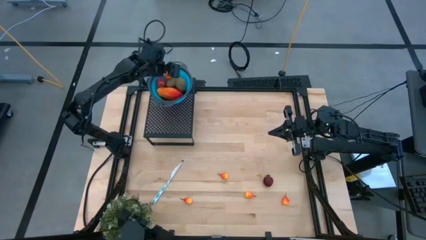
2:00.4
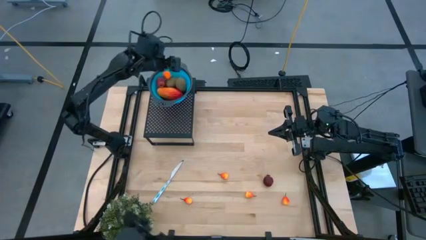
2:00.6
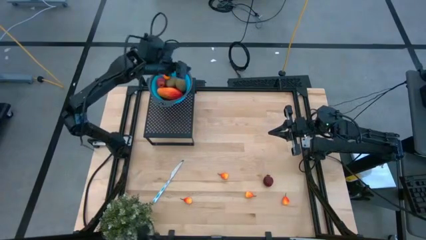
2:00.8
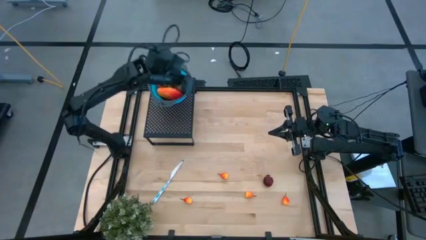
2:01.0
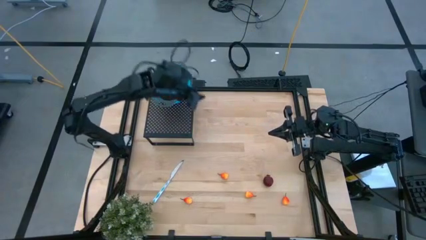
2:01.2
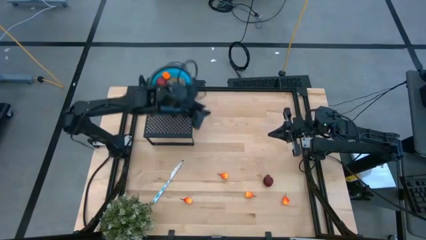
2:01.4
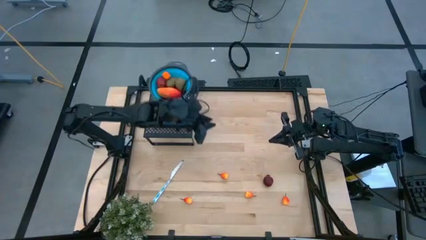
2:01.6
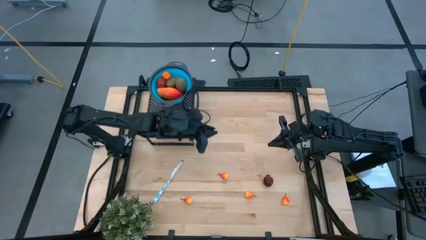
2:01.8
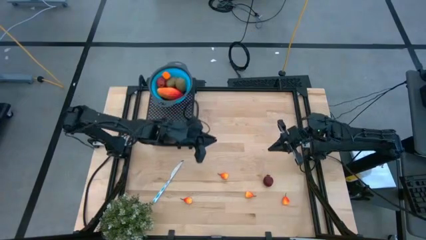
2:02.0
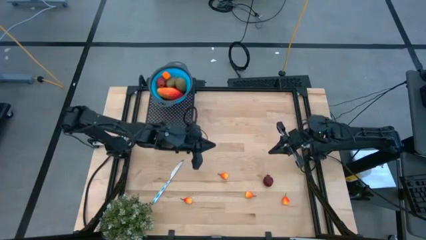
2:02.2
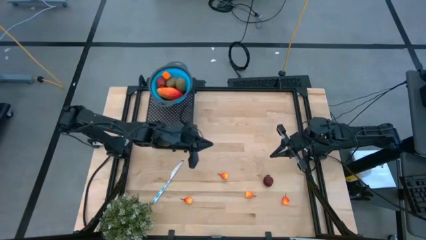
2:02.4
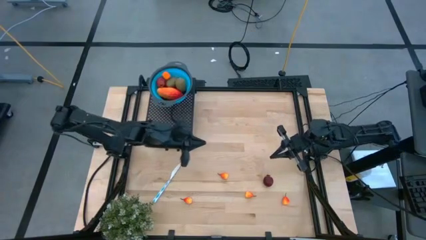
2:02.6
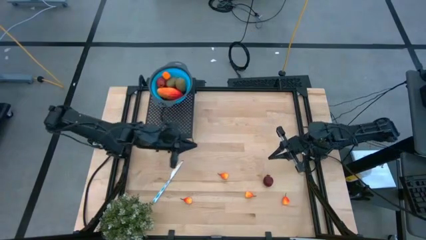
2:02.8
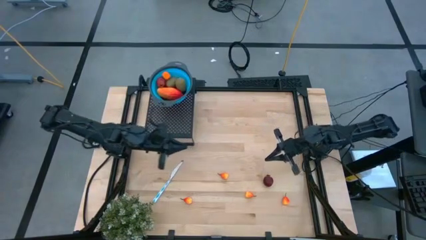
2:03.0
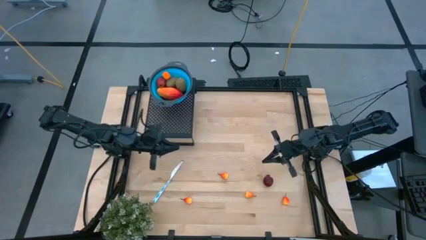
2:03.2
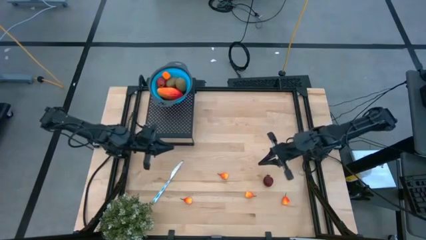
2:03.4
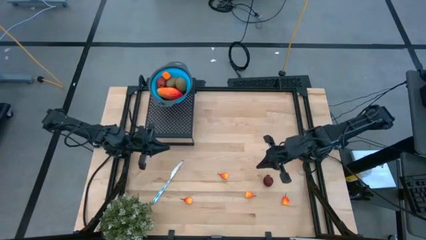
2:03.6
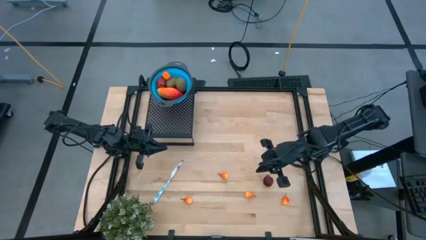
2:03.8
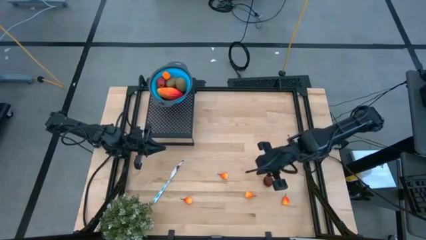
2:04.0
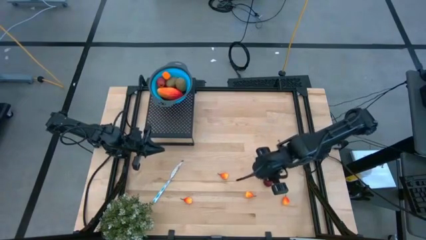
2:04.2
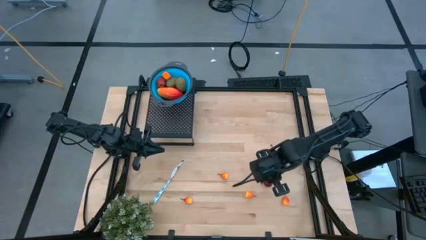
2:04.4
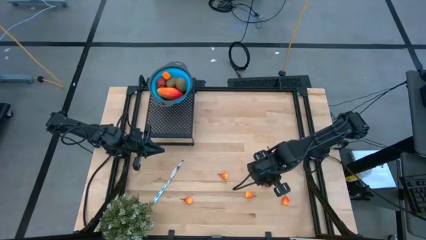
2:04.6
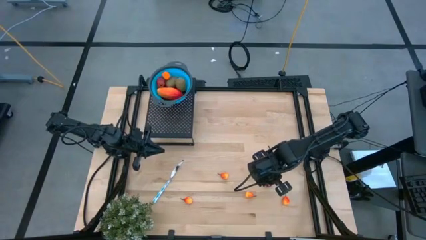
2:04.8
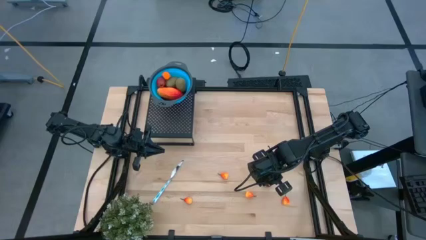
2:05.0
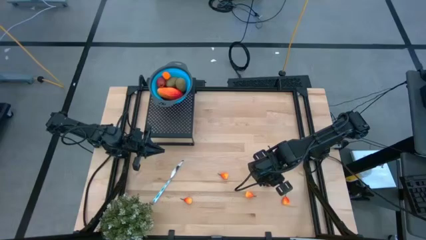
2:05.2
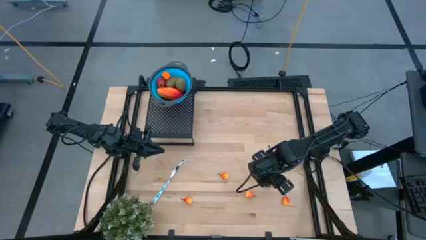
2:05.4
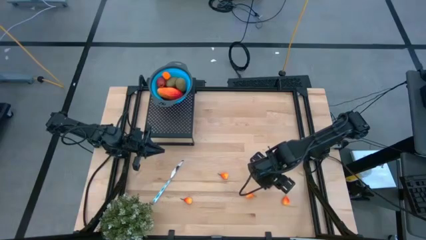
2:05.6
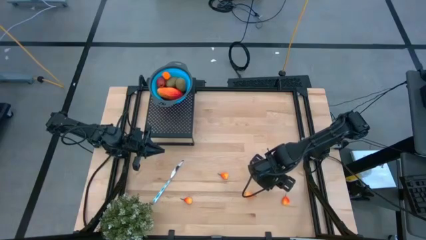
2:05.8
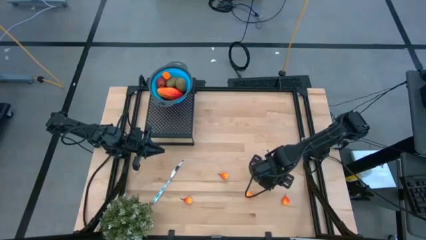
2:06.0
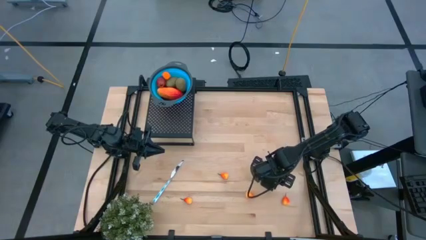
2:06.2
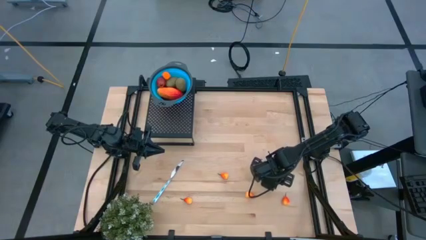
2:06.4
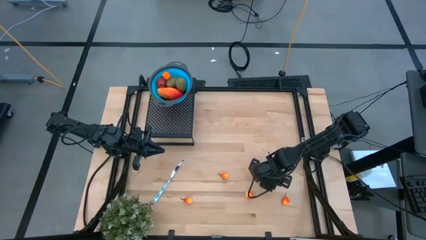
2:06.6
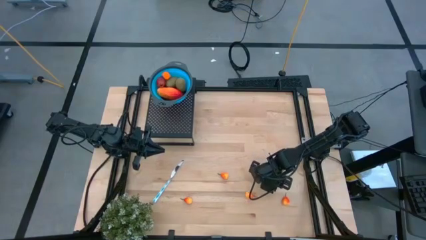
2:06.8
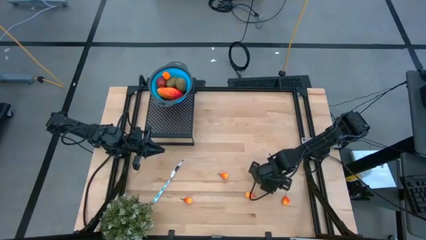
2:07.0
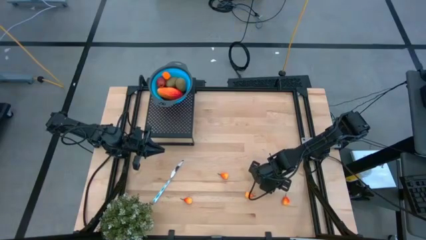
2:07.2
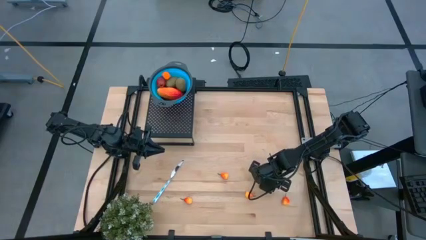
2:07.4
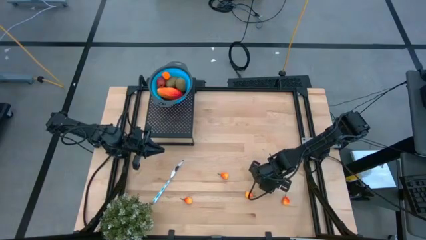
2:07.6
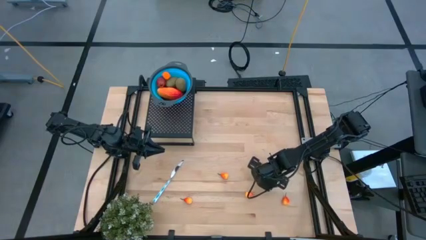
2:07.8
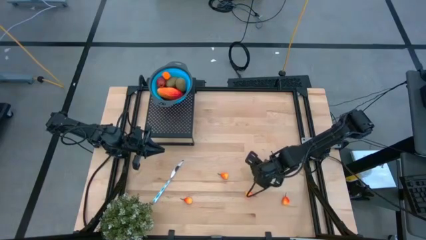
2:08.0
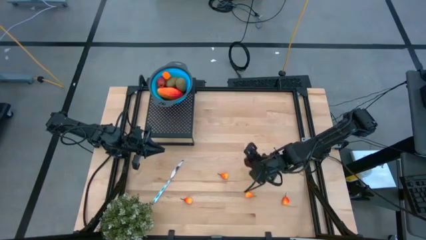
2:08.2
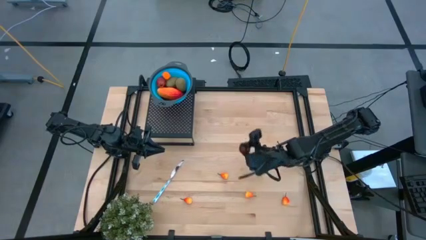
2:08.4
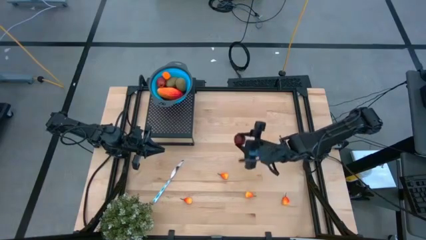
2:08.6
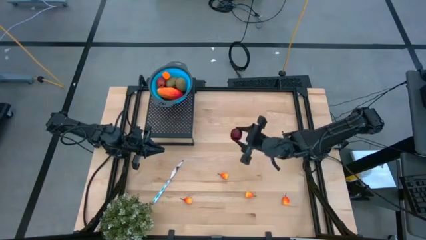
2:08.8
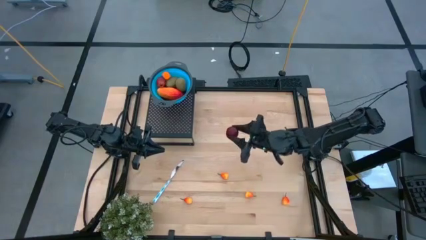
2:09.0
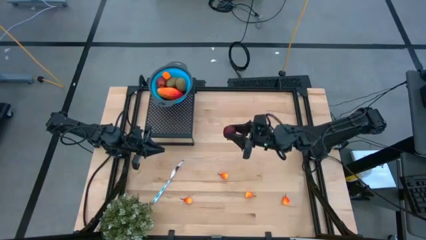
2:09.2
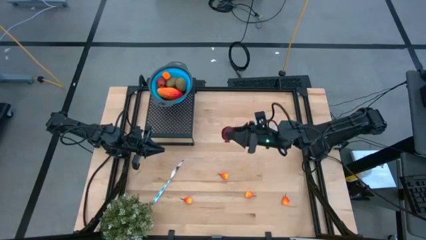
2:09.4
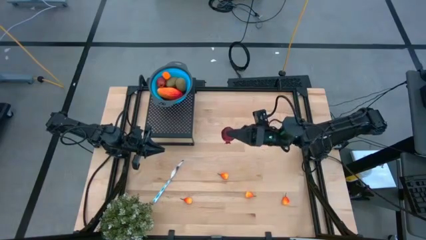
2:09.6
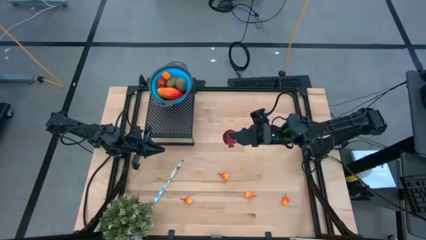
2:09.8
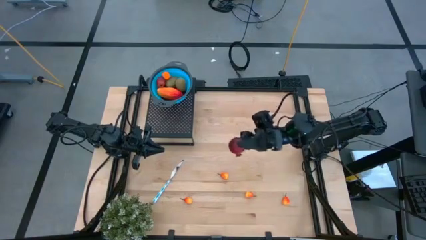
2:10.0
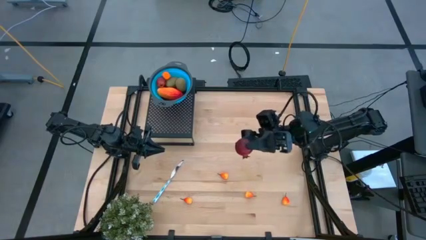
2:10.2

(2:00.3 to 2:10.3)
Task: Pick & Place Fruit
Put the red pomegranate into the blue strainer bowl on the shelf

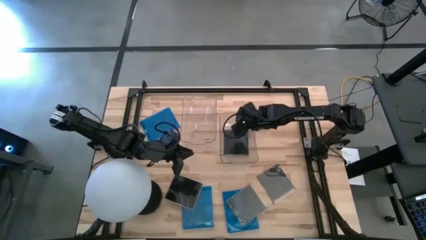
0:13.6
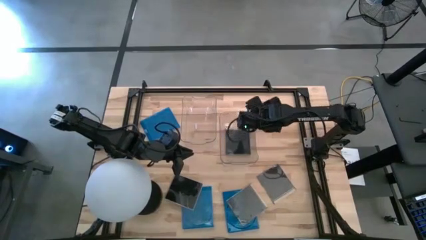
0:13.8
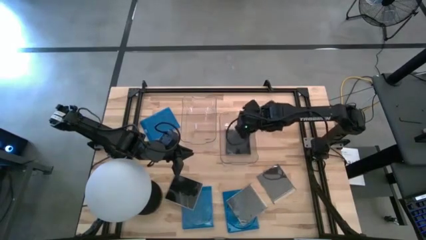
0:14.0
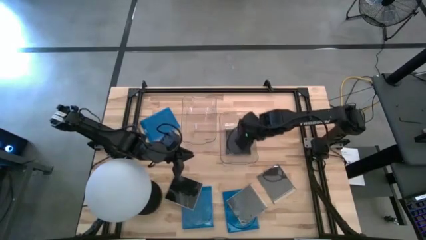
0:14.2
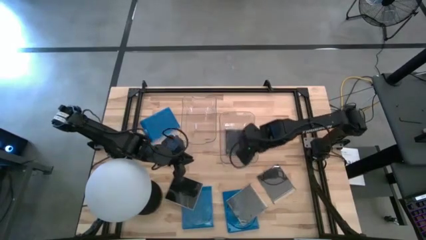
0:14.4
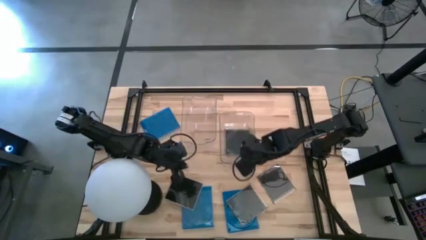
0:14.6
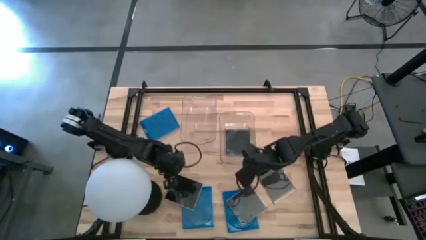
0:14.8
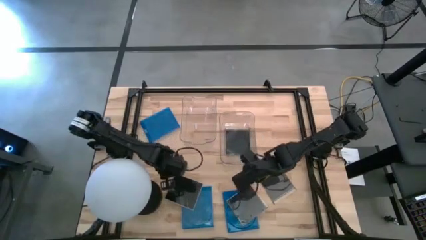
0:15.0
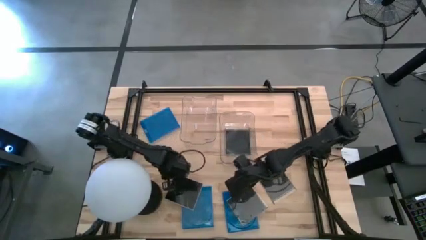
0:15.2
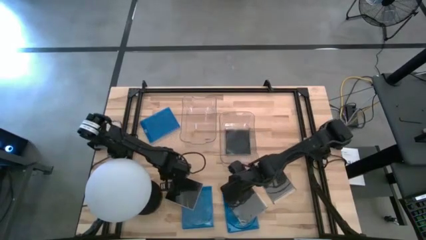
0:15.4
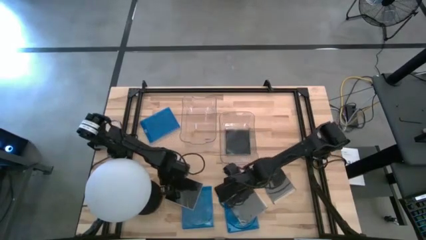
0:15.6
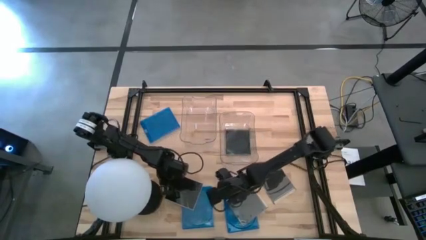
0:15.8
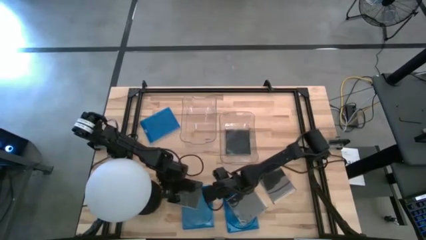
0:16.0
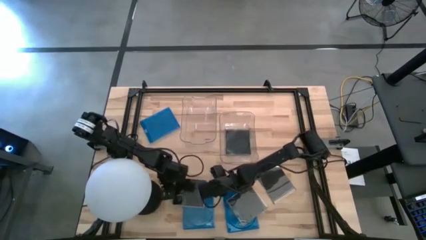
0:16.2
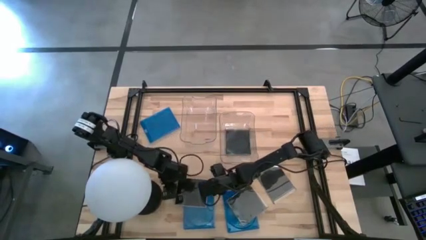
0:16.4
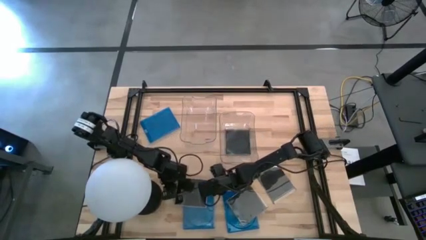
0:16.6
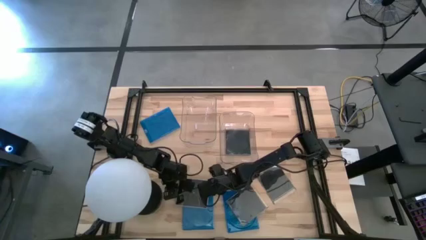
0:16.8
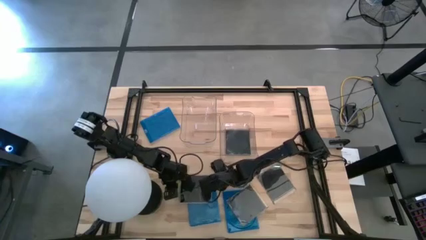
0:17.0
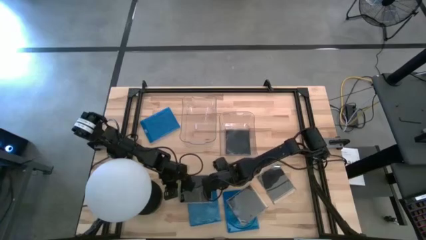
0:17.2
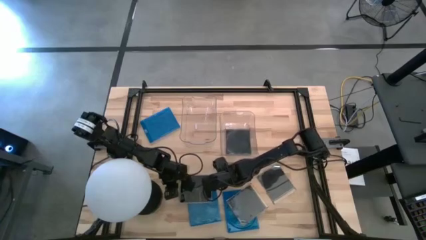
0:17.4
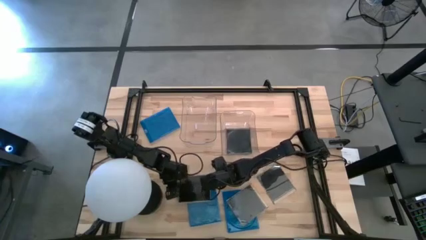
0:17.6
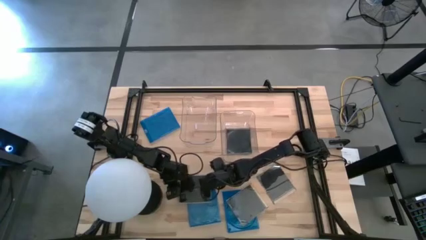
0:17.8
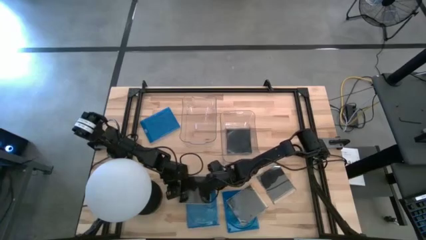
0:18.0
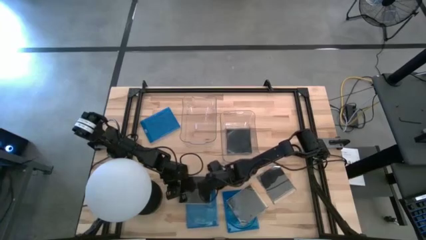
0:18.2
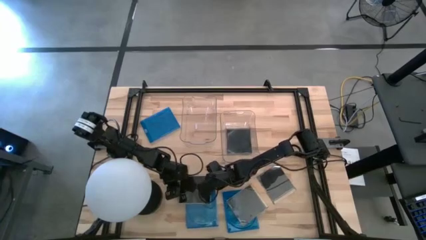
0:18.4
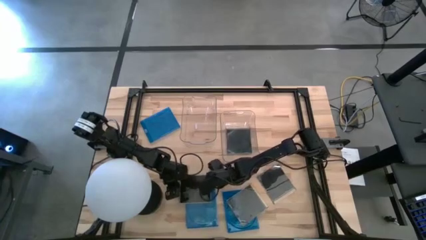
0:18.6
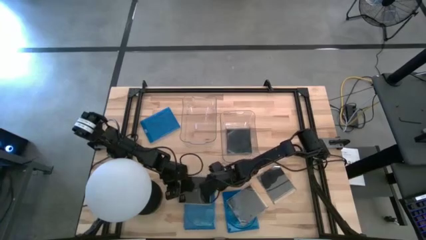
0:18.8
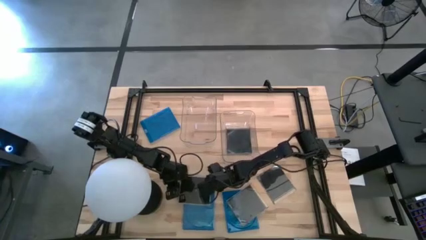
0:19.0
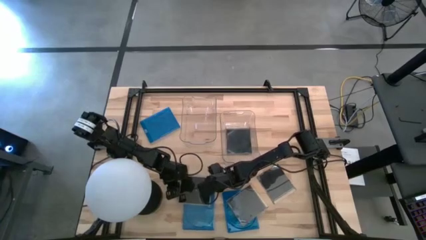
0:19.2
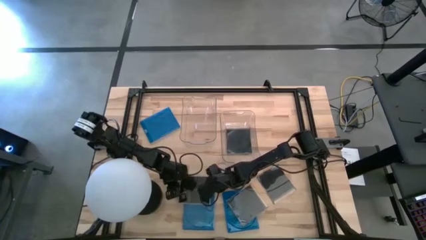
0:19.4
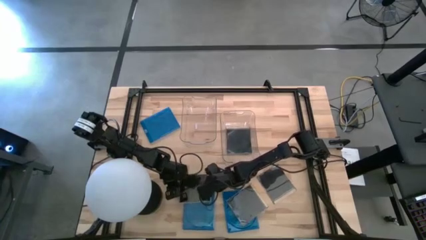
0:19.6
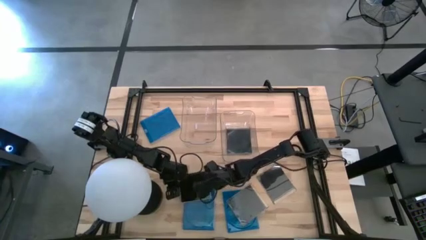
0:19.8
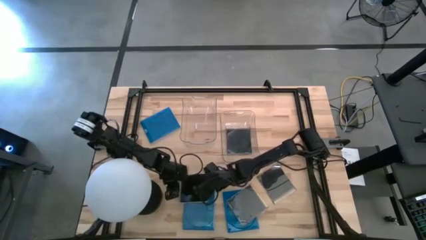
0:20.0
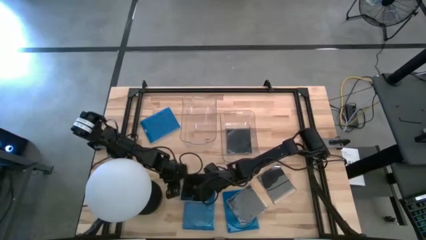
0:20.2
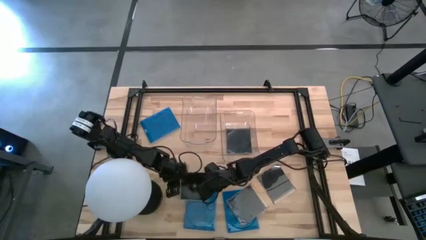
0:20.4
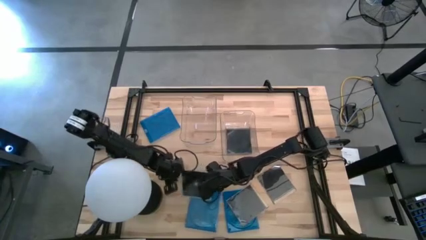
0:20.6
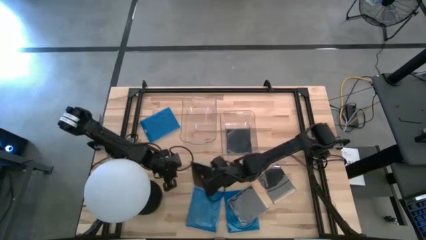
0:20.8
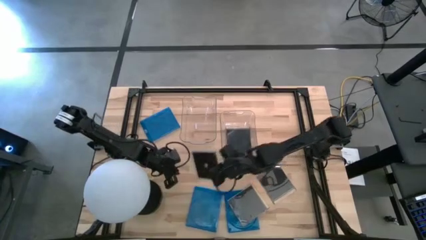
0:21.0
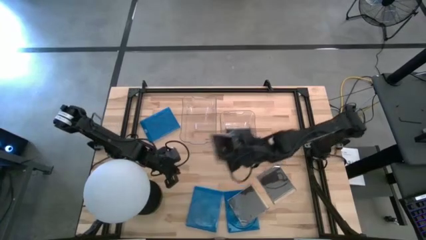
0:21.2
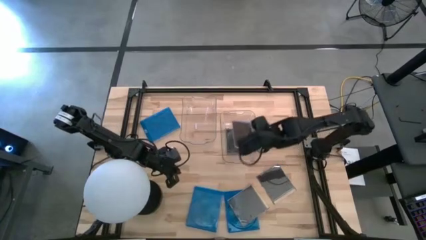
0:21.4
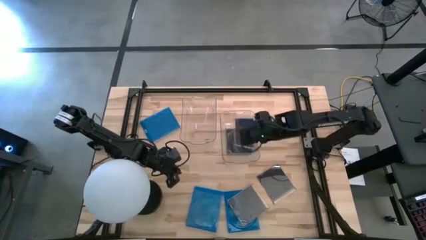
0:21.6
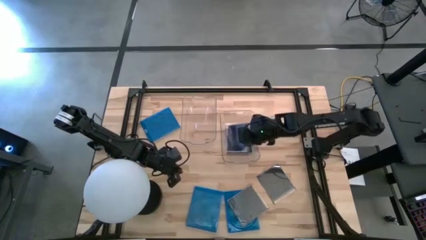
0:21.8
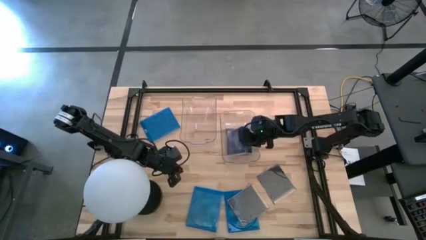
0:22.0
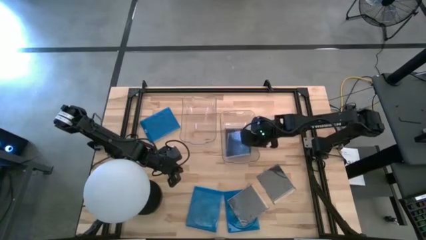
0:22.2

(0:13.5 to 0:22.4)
Task: Pick & place jewel cases by type
Put the black CD case into the right transparent bin
